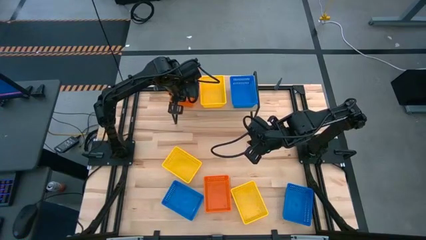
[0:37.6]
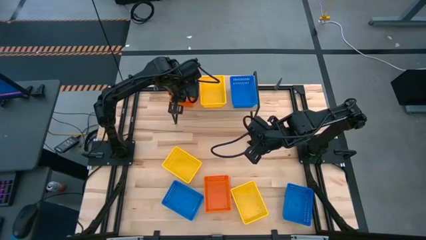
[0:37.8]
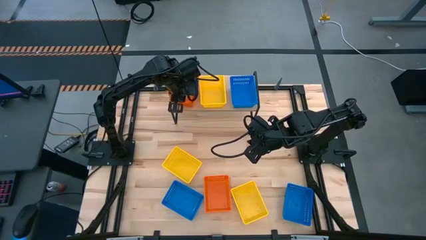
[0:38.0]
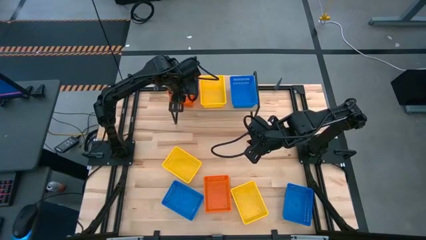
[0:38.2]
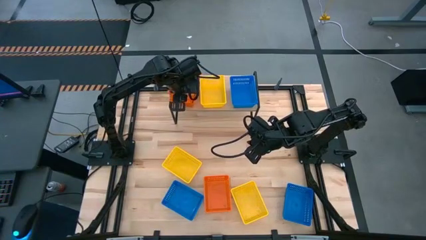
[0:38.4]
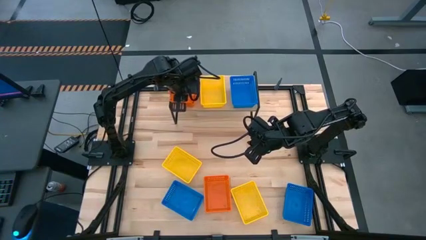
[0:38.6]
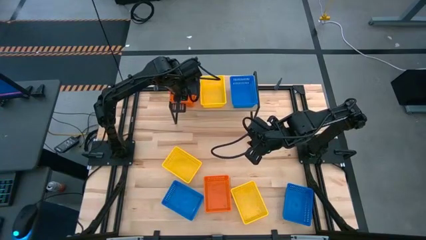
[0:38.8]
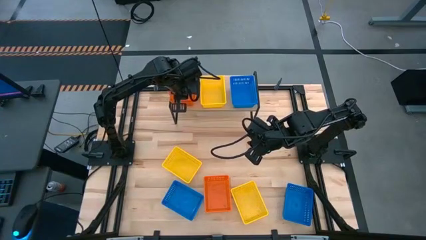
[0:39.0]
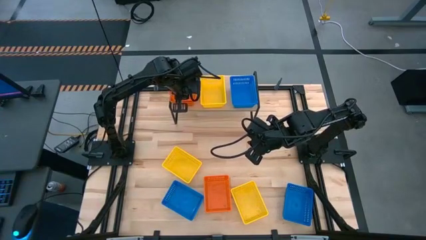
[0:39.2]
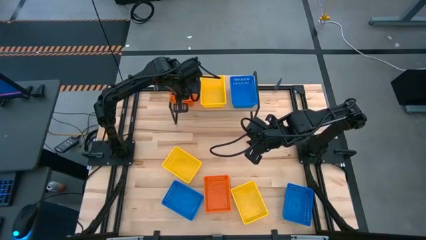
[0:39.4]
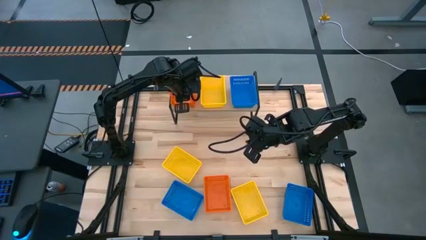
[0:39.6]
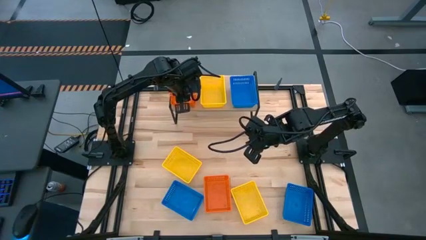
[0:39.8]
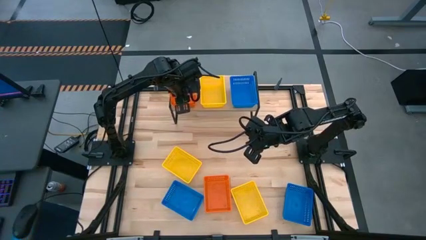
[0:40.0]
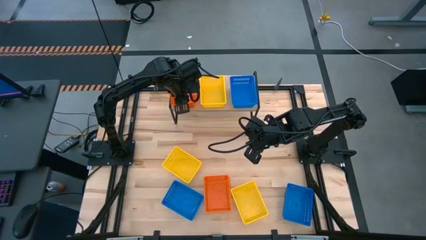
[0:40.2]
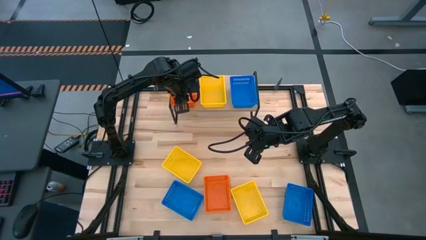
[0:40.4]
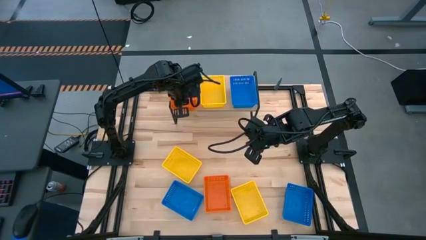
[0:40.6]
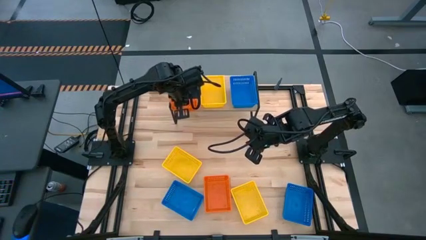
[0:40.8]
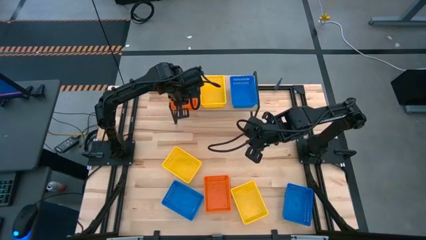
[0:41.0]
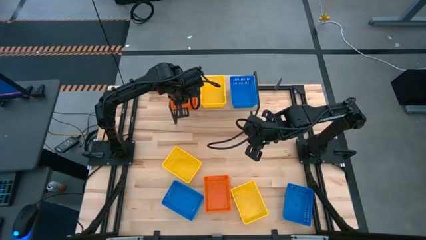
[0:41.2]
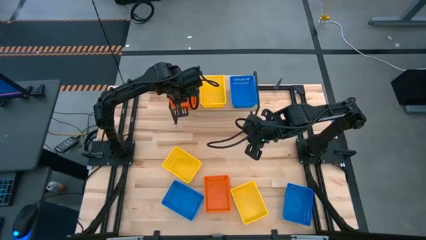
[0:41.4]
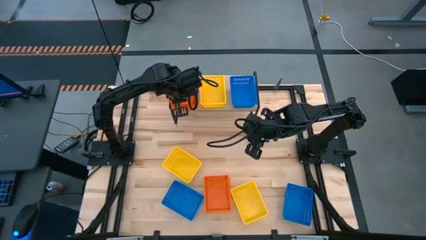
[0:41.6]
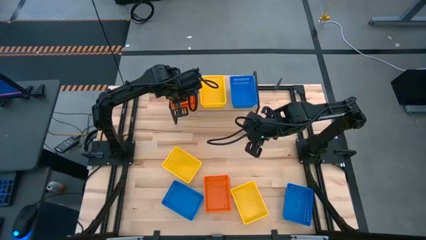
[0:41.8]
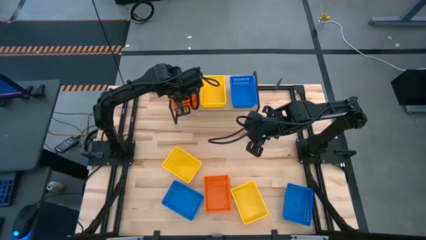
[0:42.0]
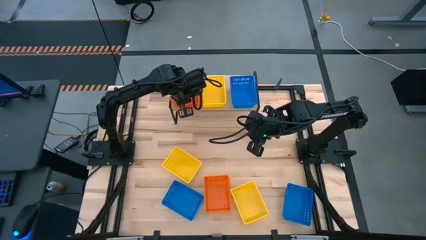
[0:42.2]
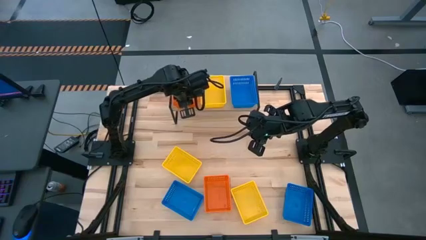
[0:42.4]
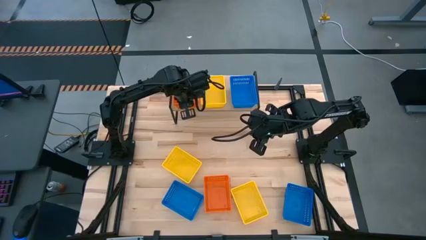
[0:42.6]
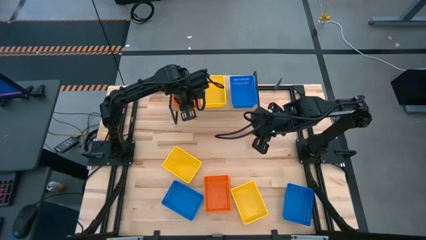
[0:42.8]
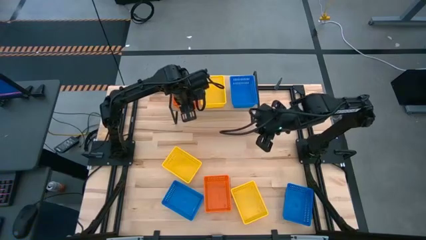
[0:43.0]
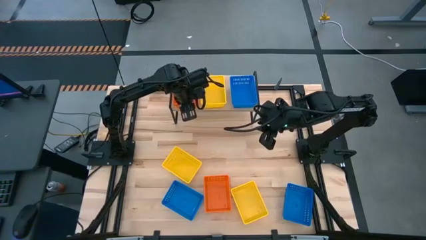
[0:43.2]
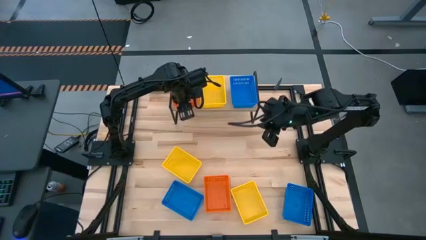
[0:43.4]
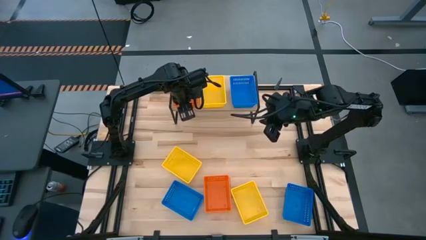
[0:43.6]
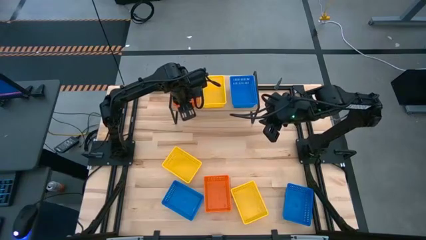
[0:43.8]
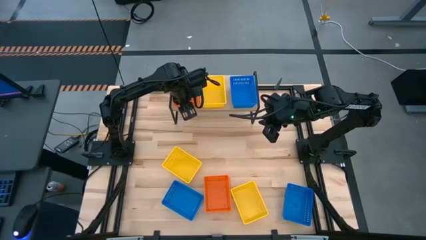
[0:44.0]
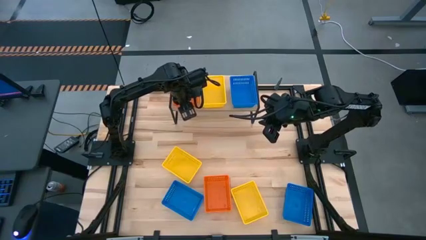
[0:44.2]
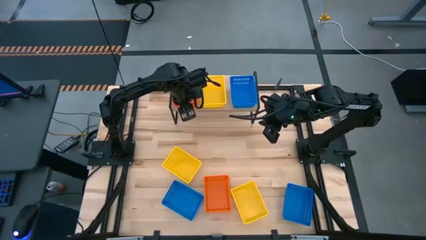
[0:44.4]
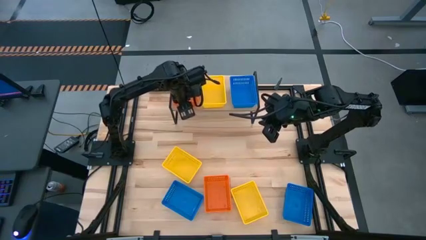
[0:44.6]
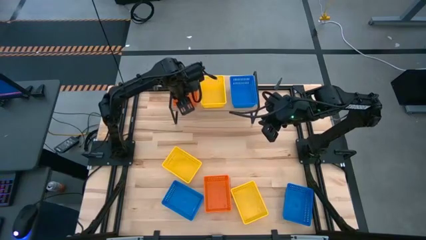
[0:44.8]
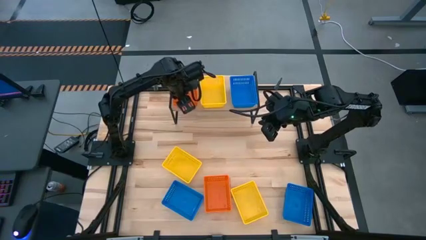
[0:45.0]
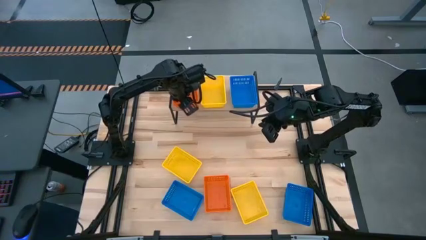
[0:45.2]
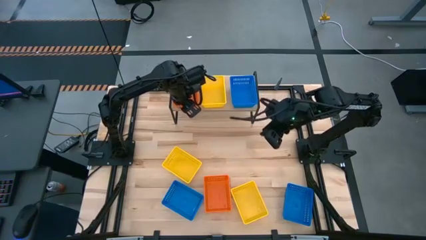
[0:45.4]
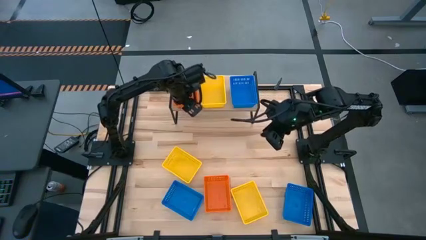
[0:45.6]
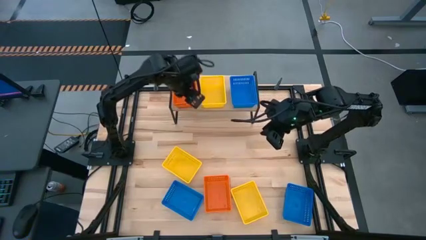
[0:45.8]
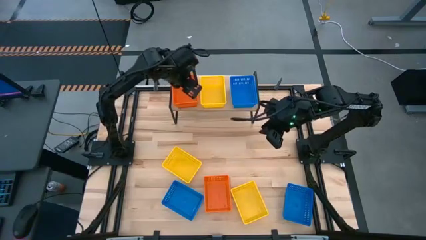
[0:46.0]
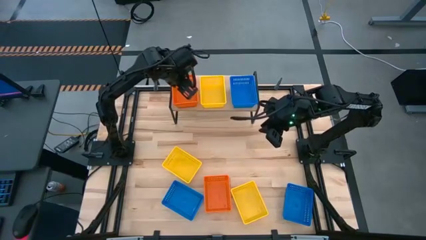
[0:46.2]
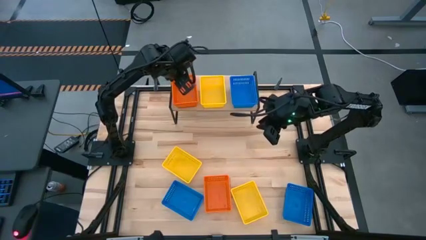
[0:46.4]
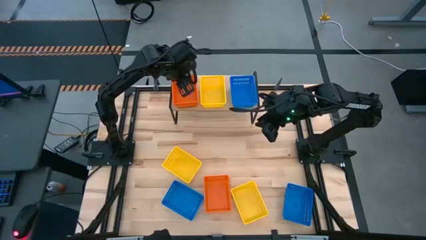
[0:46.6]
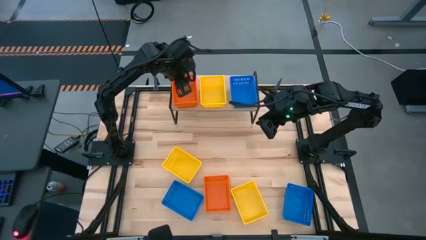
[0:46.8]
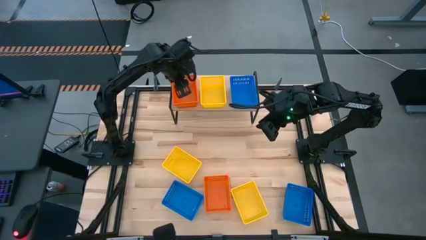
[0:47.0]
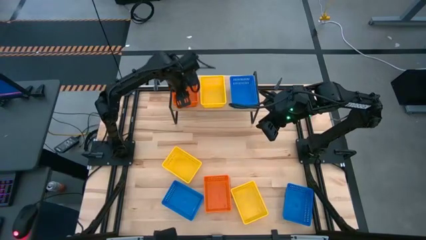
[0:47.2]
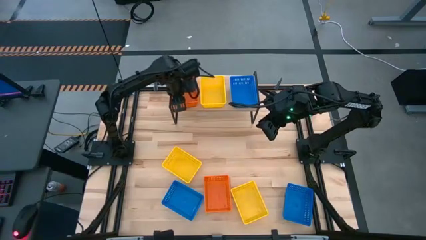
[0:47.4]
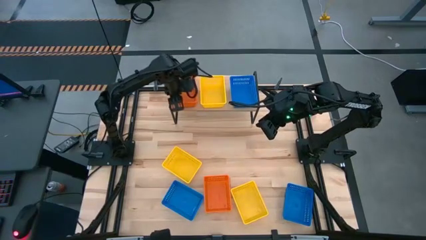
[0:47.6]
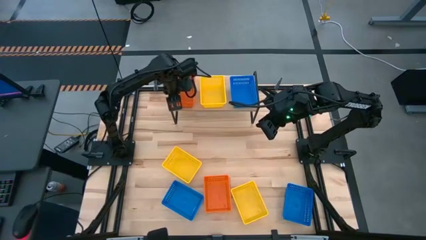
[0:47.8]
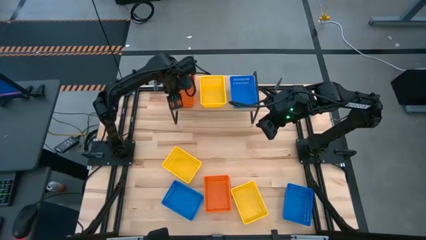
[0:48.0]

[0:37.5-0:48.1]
Task: Stack baskets on shelf by color
Stack the left orange bin on top of the orange bin on the shelf

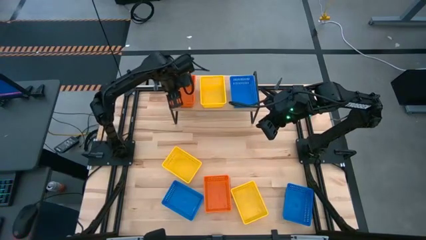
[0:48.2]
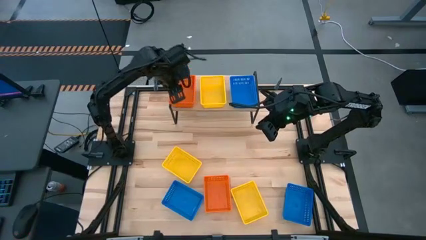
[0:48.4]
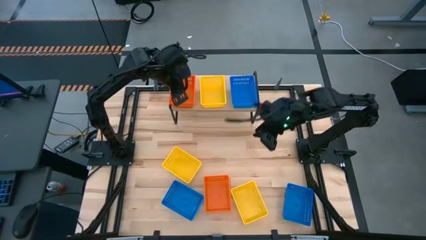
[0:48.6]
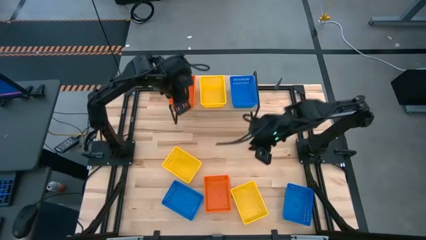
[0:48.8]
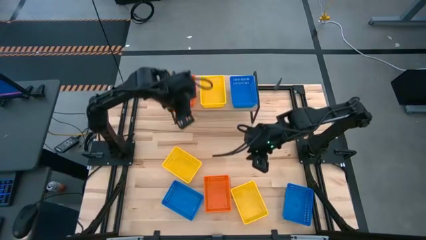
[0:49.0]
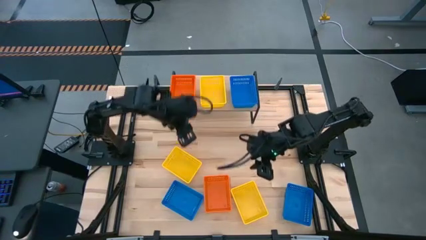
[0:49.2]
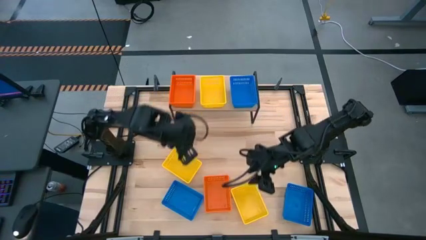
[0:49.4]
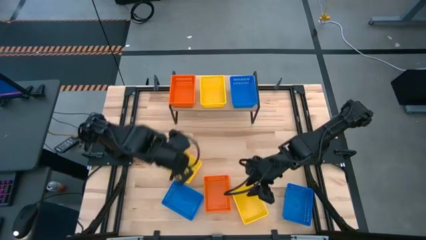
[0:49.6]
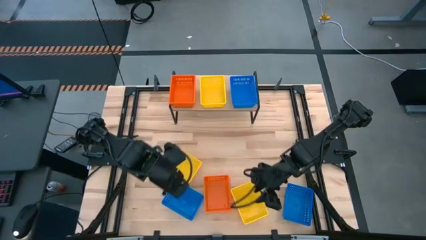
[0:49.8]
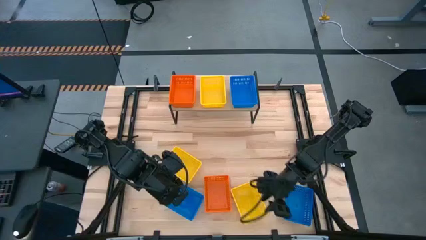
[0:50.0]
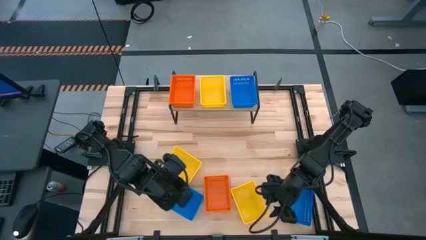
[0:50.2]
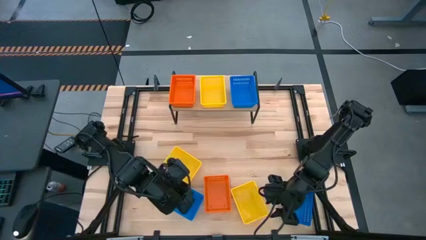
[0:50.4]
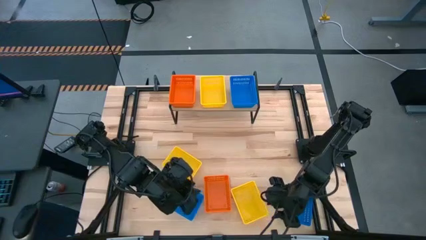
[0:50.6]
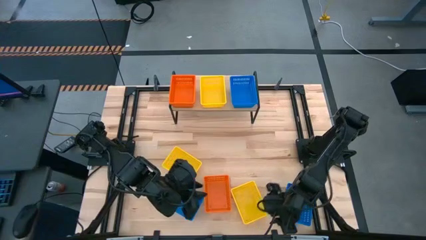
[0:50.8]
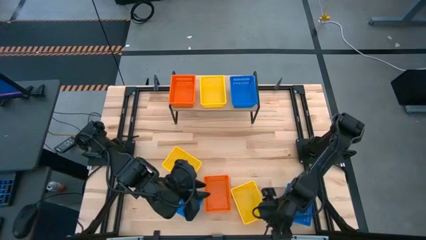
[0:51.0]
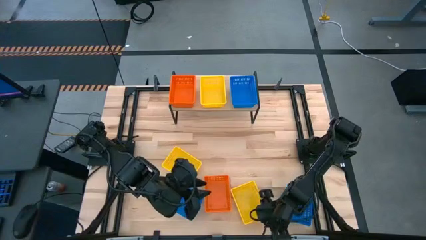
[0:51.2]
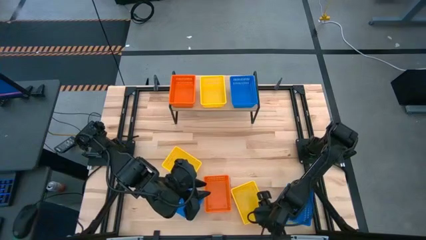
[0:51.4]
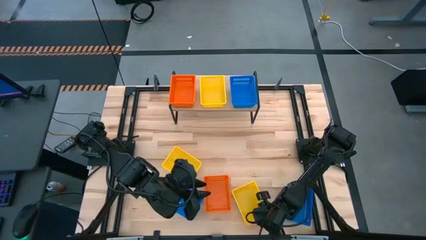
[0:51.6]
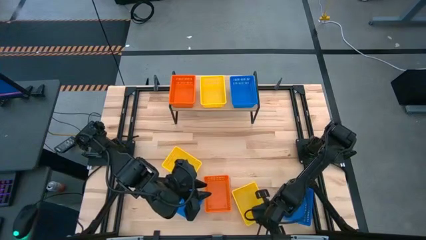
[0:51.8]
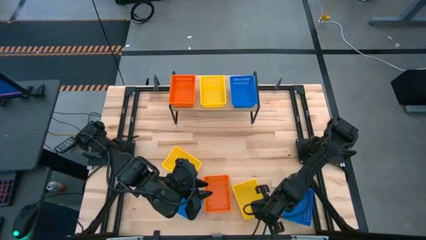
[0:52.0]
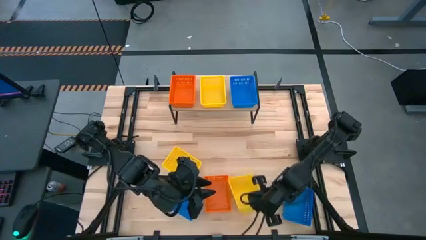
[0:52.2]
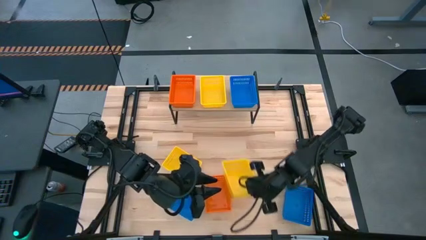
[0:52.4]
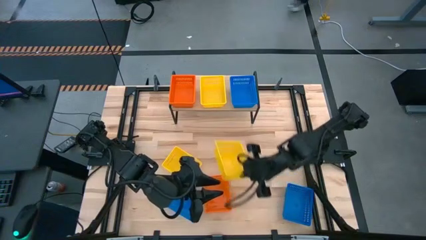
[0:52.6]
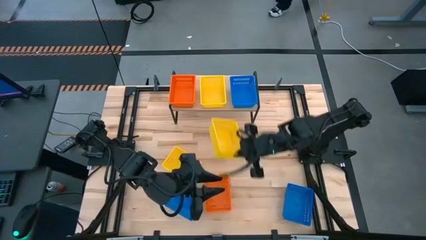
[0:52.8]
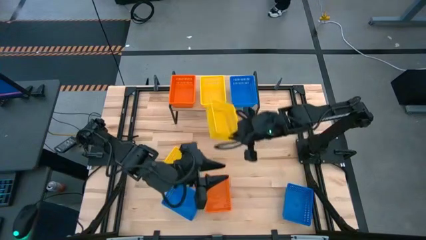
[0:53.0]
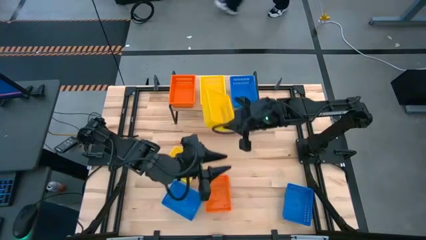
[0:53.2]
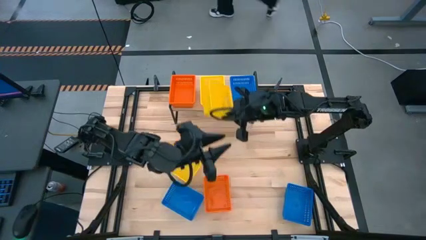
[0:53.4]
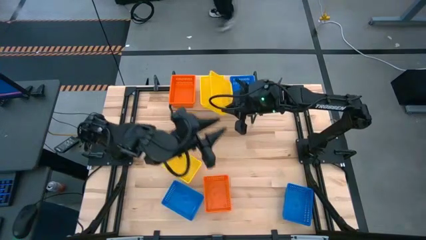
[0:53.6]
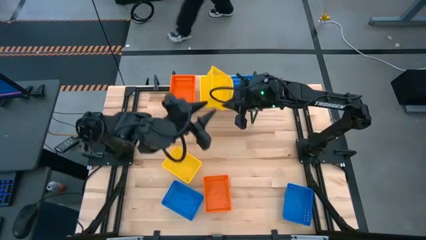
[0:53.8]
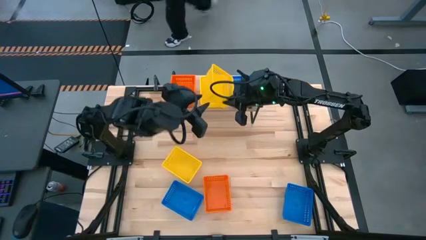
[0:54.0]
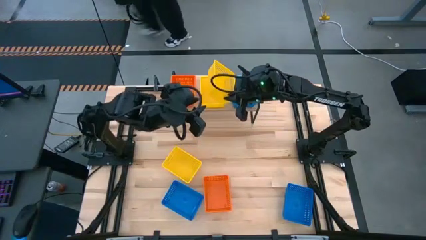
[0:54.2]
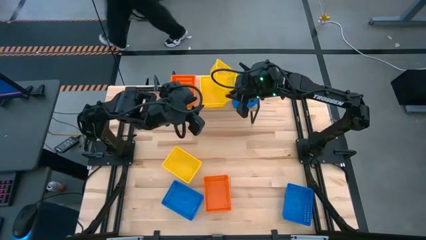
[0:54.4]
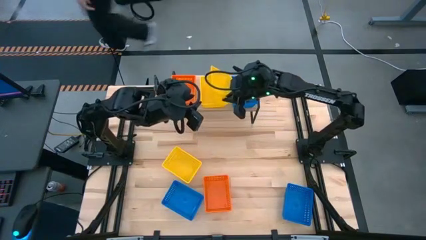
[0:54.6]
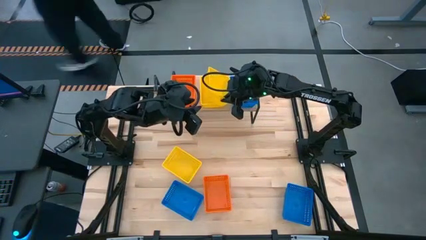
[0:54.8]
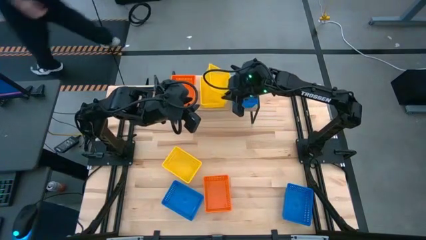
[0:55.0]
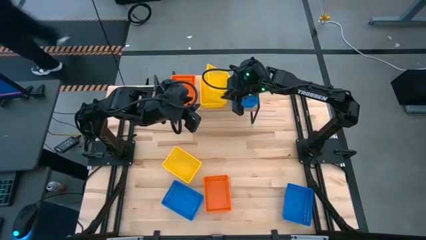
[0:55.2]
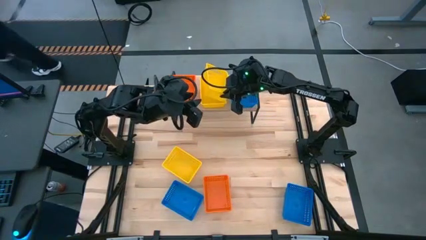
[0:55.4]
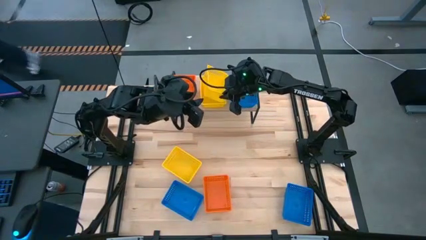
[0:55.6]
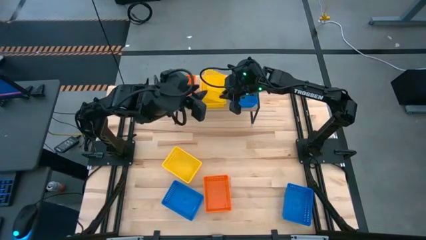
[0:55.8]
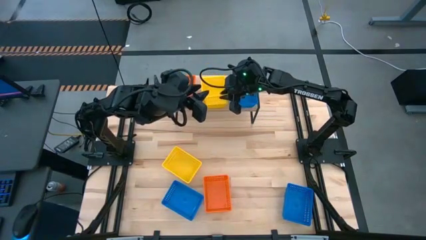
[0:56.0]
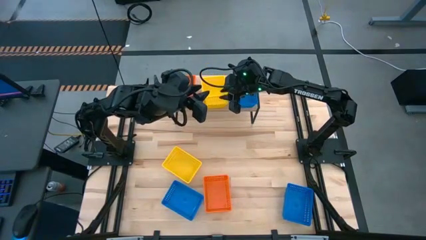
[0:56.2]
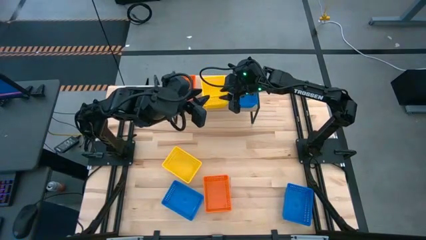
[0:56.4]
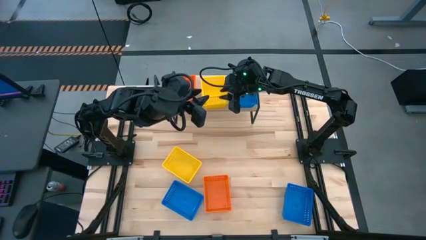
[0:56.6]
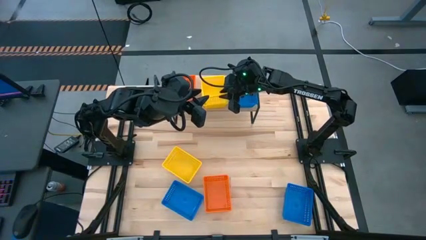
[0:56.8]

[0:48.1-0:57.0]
Stack the bottom yellow bin on top of the yellow bin on the shelf
